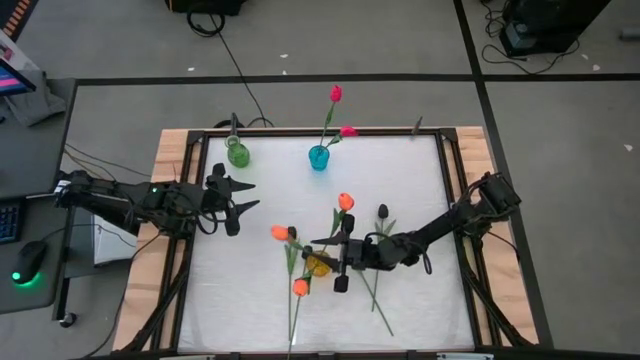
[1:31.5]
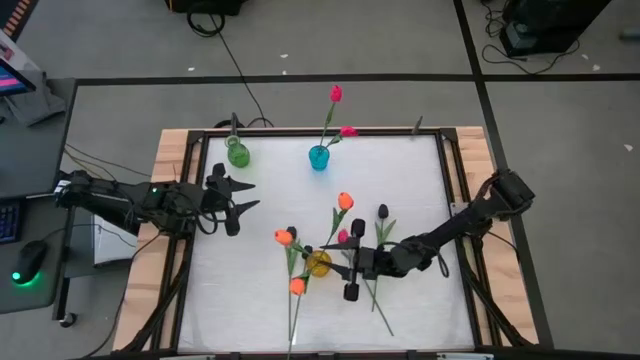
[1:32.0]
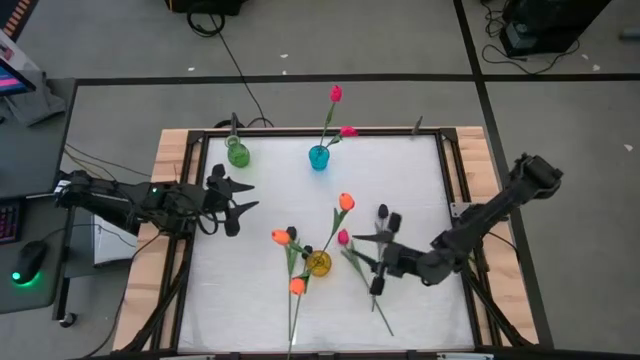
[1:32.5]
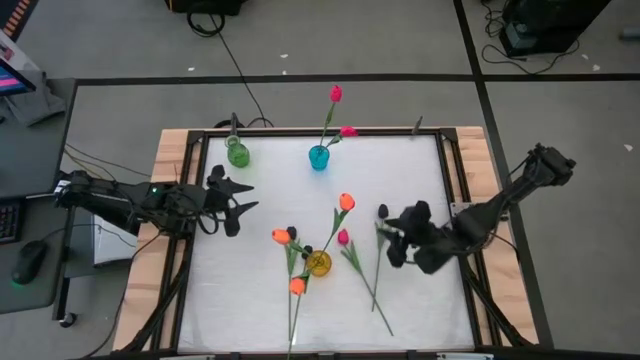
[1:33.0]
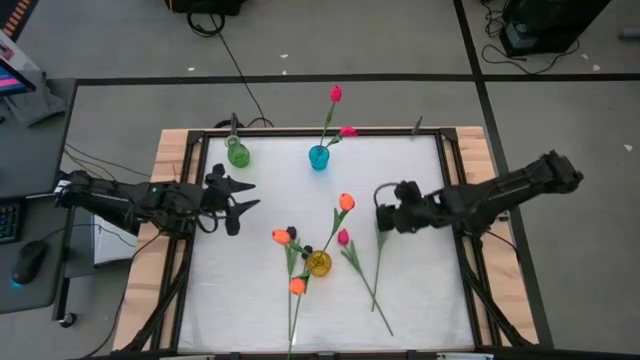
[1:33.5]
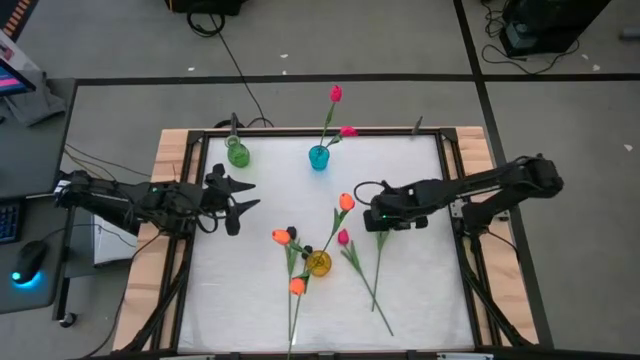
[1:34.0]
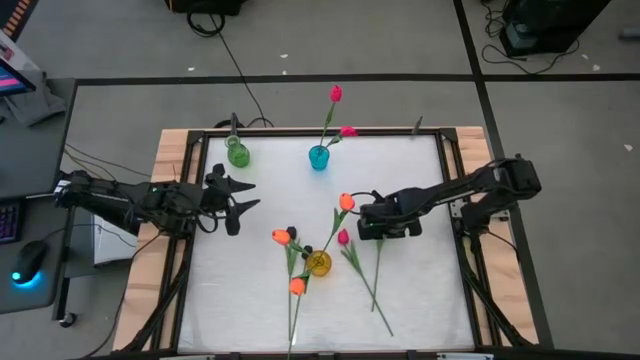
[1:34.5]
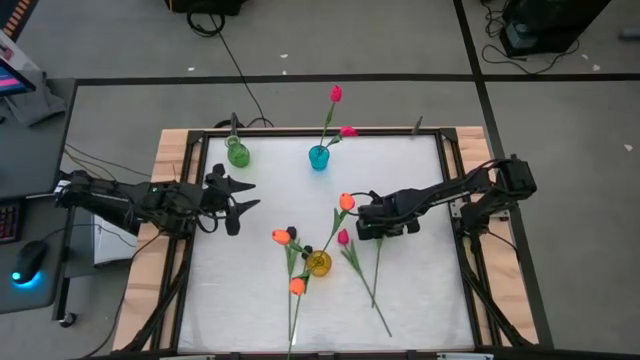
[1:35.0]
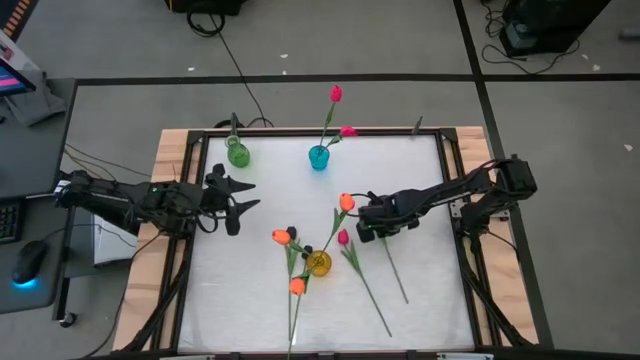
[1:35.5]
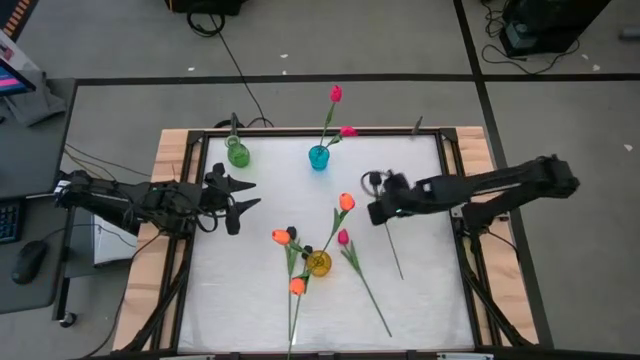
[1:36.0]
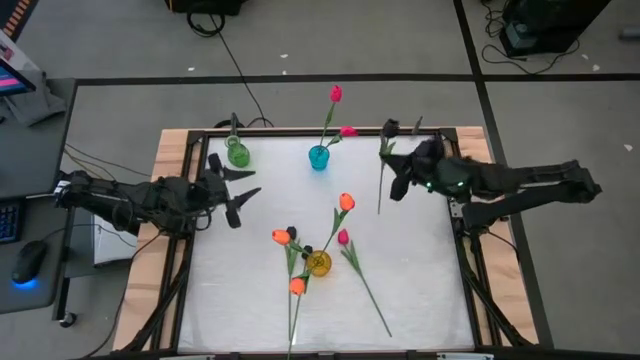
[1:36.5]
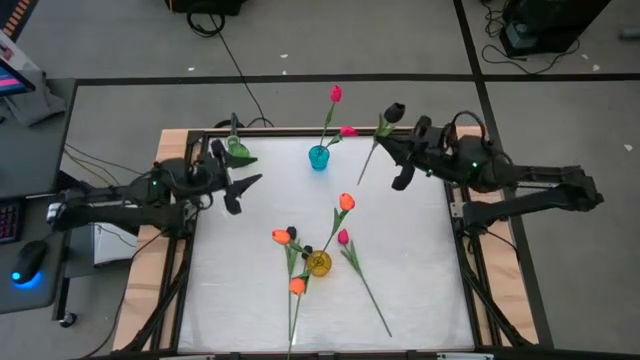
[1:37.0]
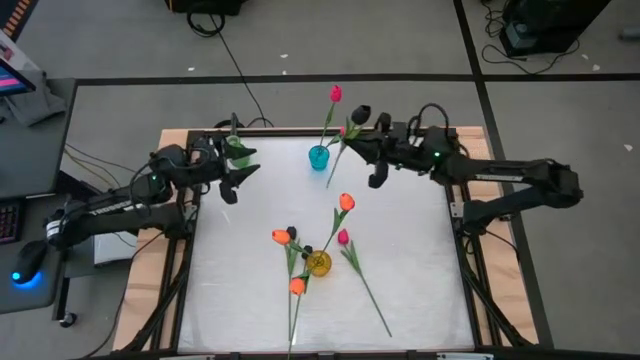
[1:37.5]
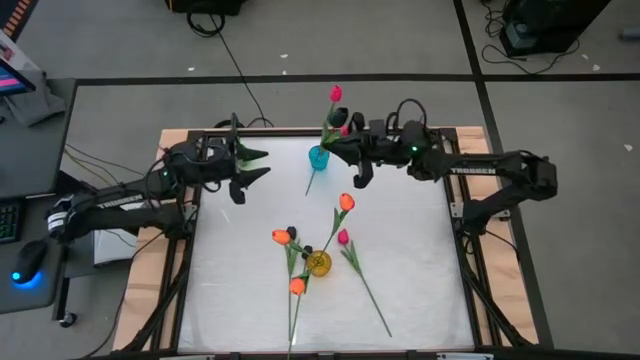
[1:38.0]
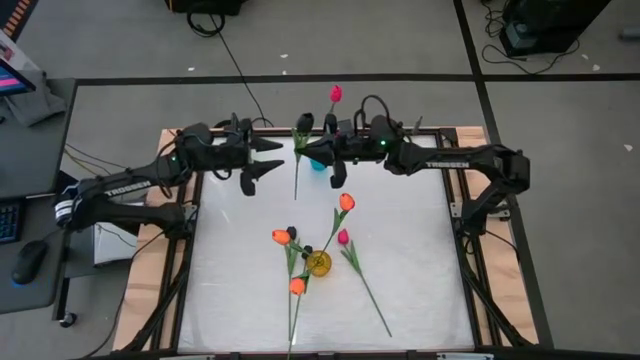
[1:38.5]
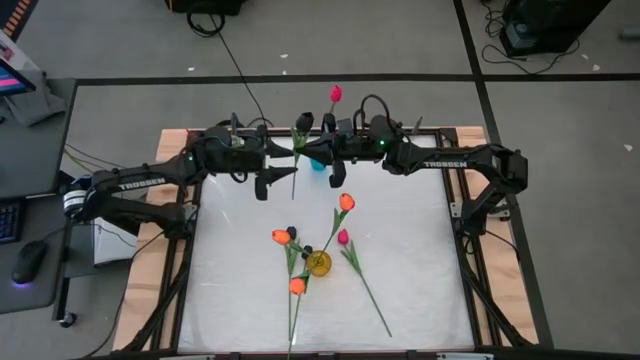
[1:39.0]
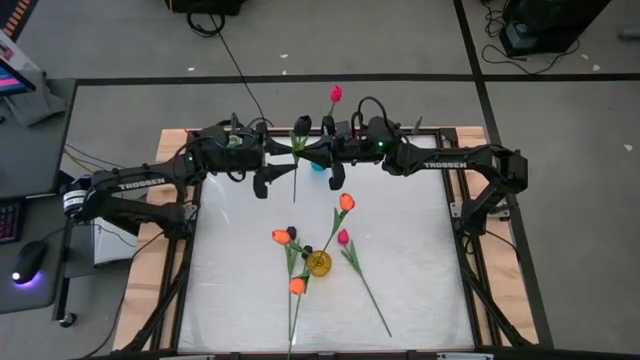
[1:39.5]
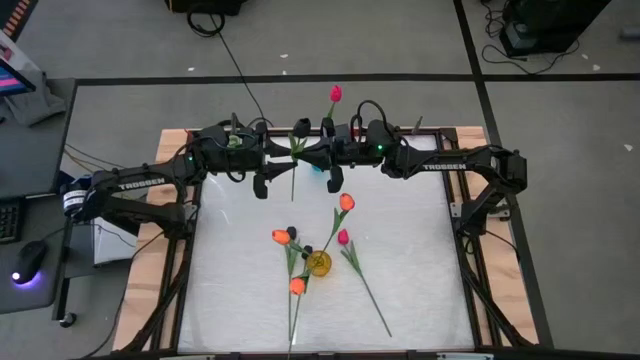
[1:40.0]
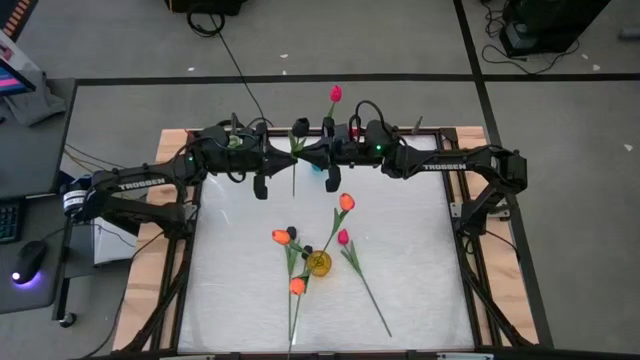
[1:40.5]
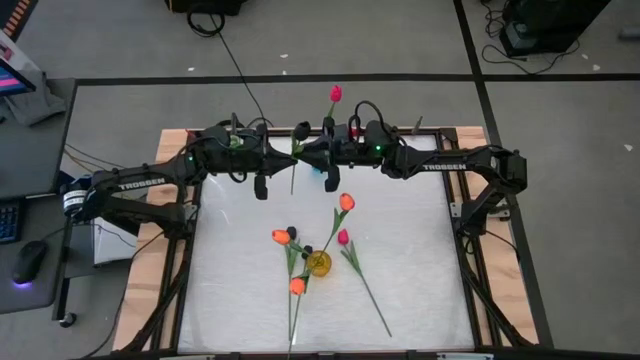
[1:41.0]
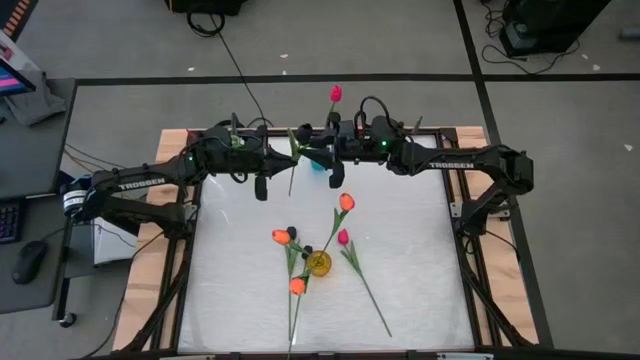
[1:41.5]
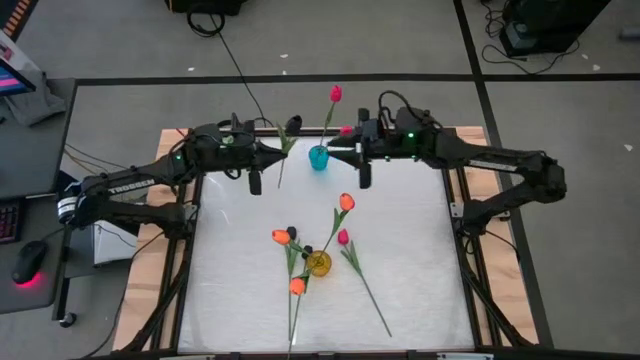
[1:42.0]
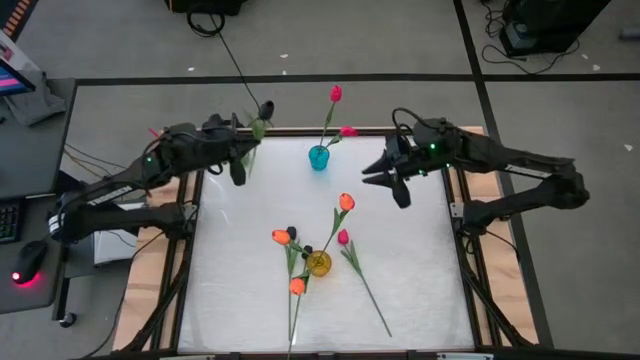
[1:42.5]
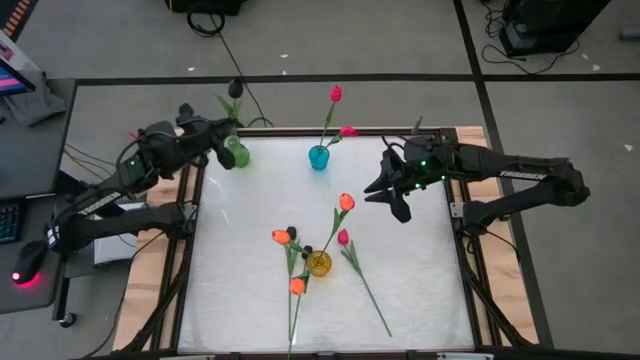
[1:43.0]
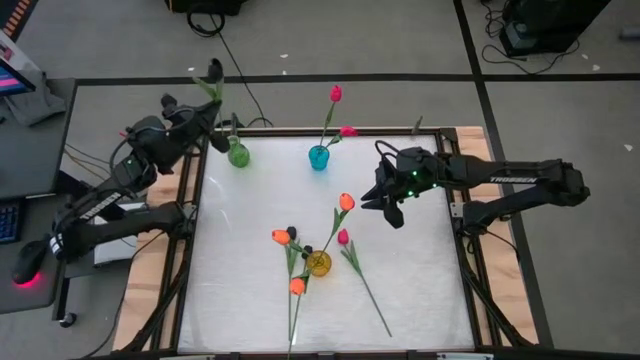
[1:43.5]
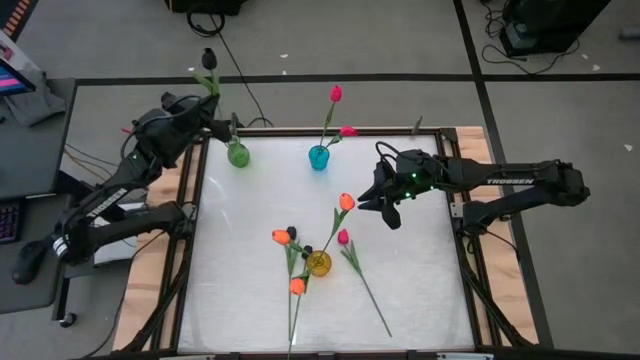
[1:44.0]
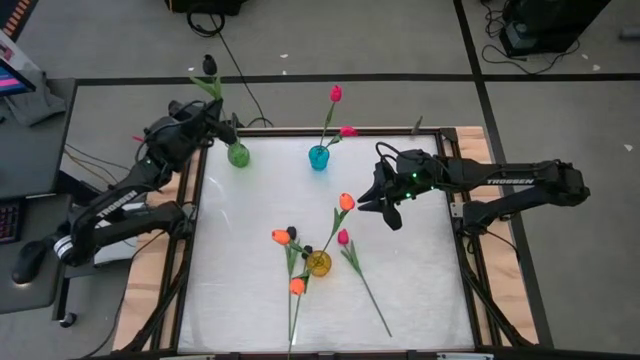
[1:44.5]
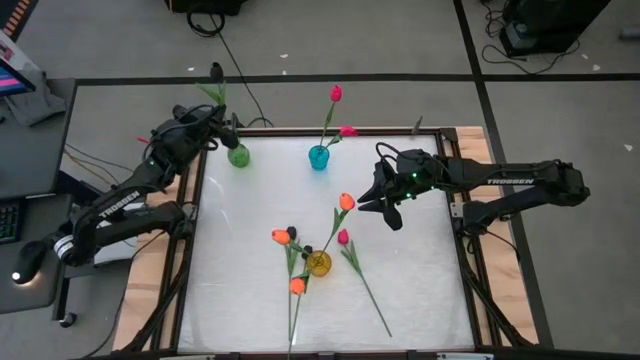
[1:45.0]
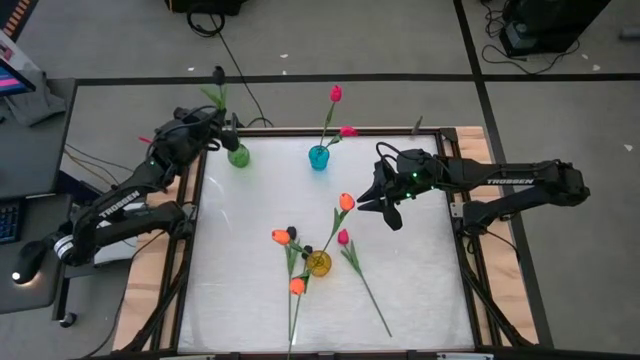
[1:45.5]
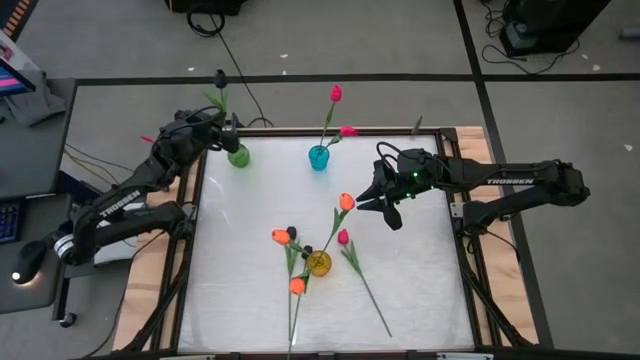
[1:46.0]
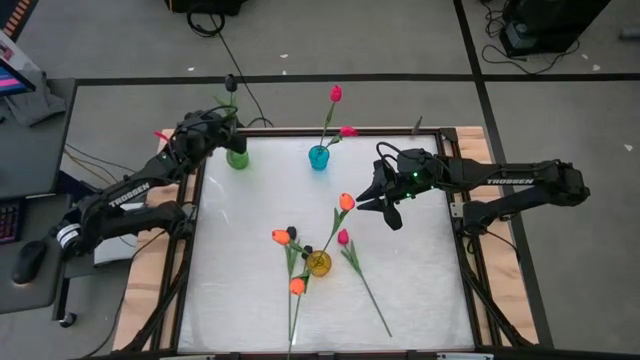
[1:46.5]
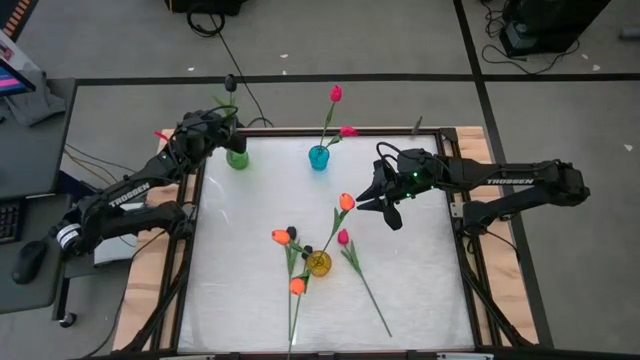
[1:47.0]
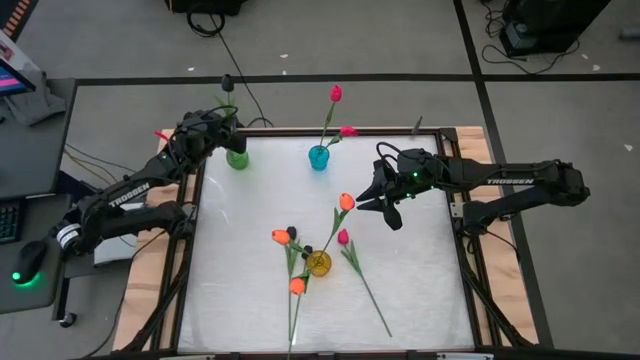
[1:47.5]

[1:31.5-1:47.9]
Task: Sort flowers into vase by color
Put the right black flower into the green vase

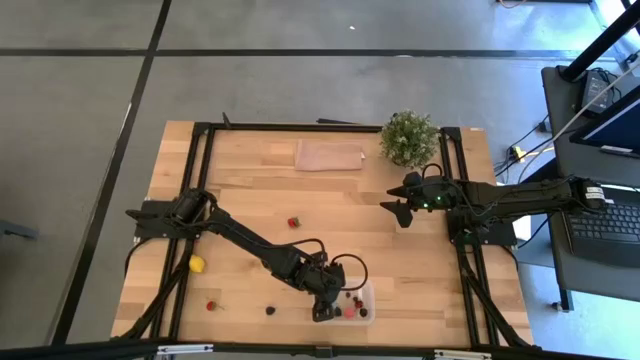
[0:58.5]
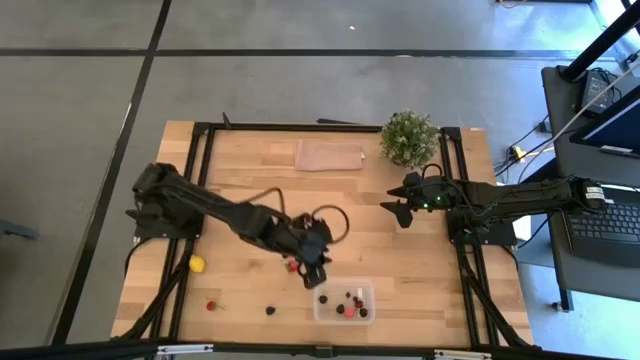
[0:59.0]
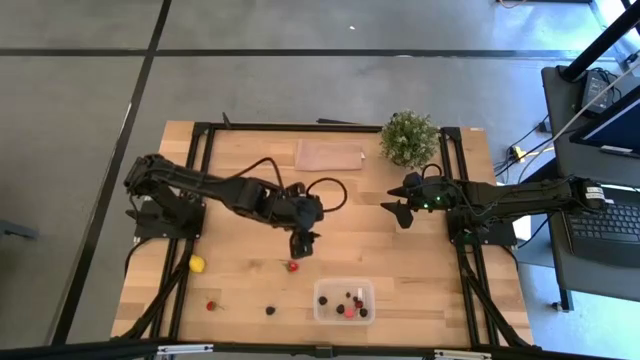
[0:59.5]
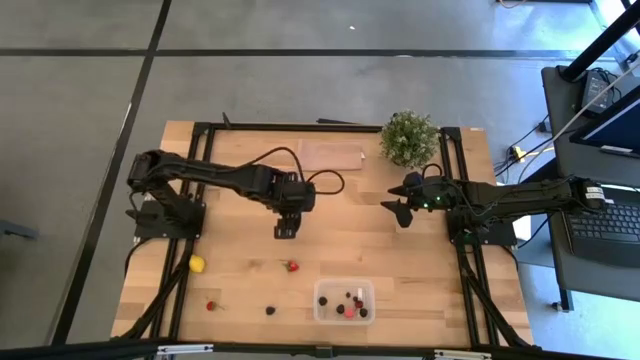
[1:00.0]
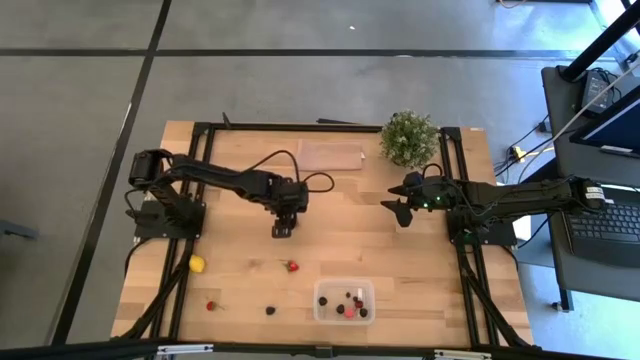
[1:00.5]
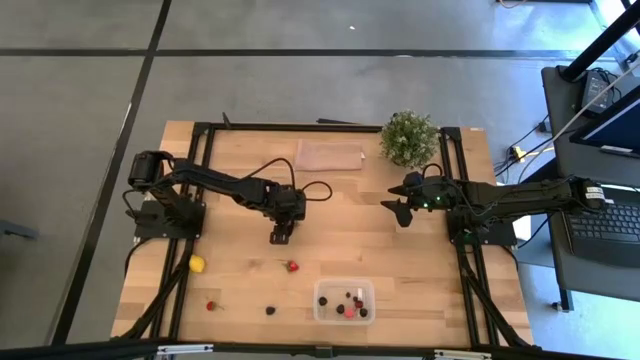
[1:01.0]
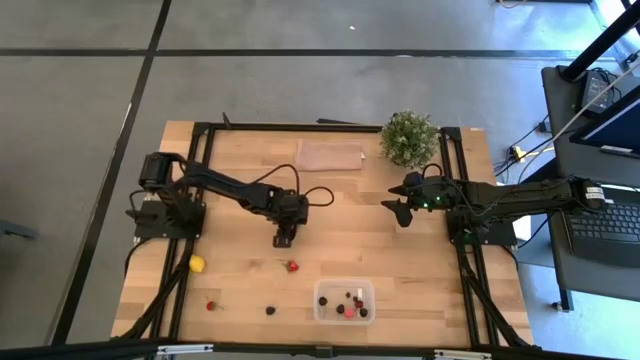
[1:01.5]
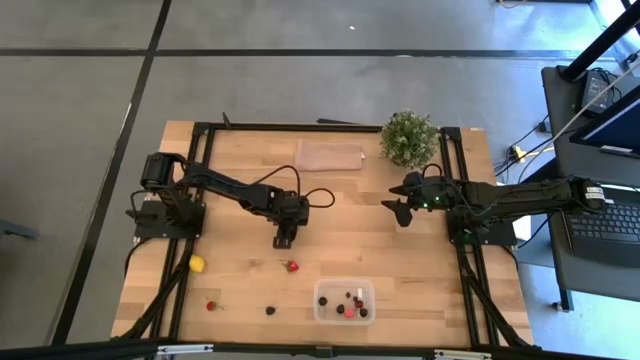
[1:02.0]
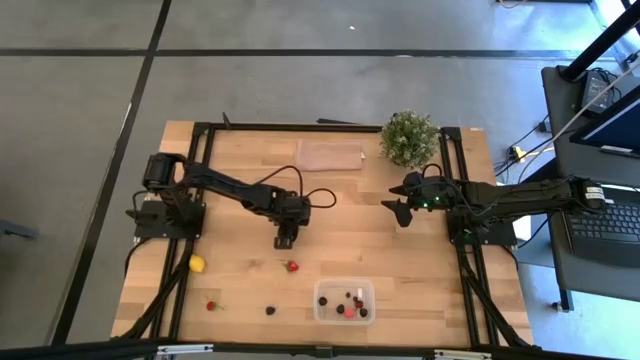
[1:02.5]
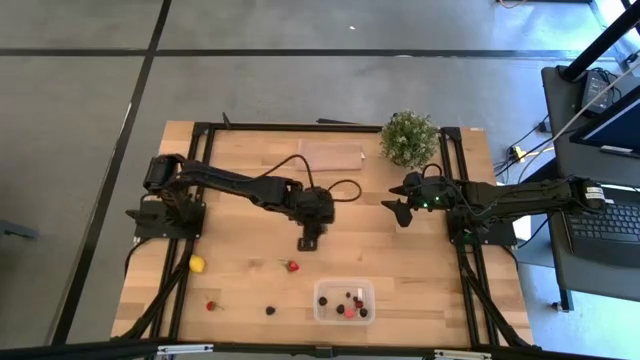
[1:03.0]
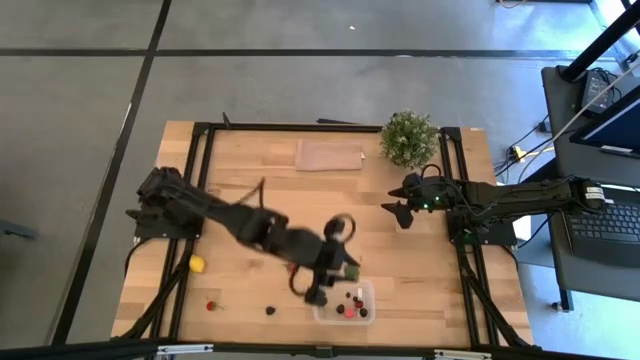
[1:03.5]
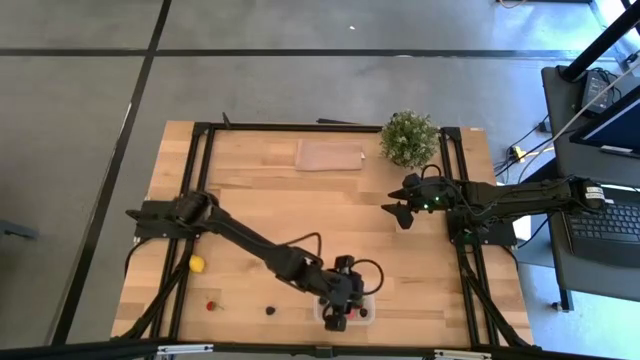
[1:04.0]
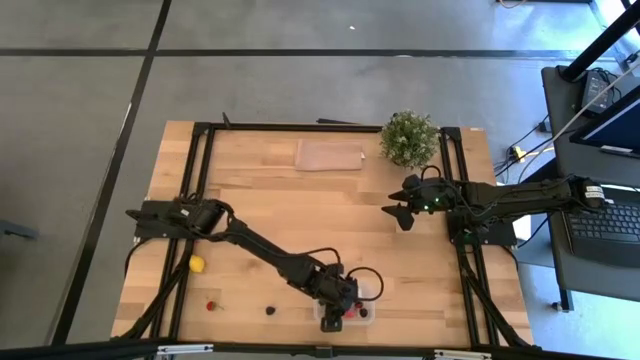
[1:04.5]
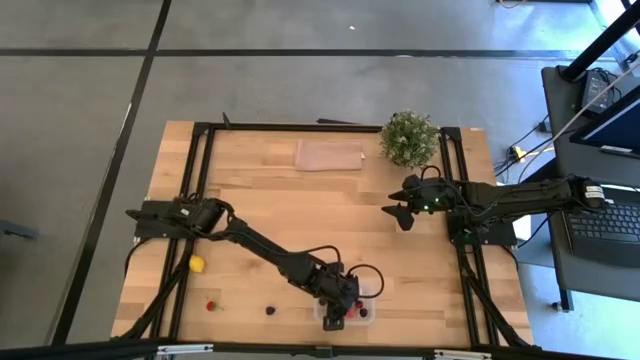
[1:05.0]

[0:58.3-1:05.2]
Task: Pick and placing Produce into tupperware
Put the top strawberry into the transparent container
